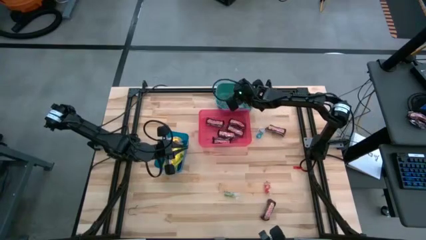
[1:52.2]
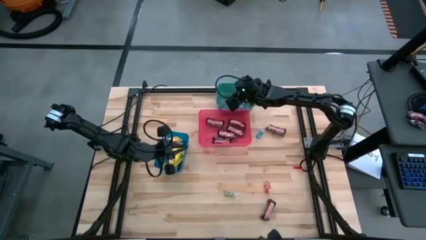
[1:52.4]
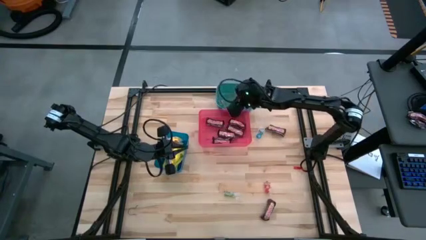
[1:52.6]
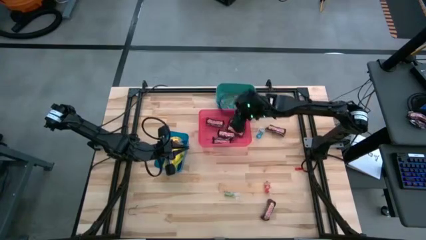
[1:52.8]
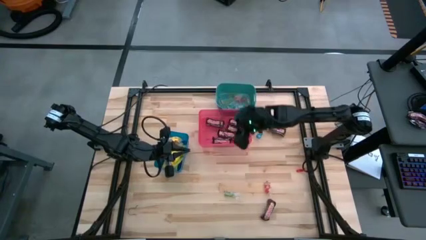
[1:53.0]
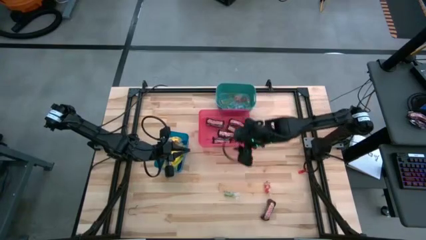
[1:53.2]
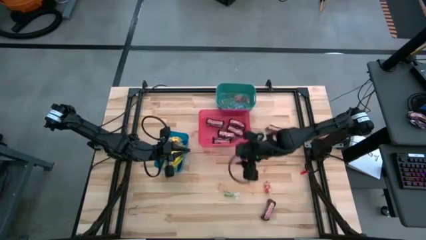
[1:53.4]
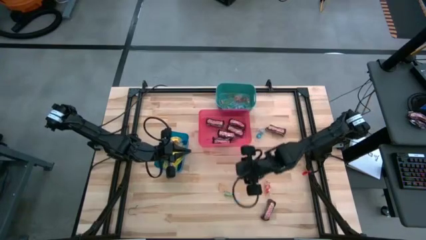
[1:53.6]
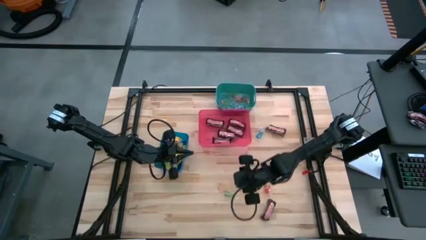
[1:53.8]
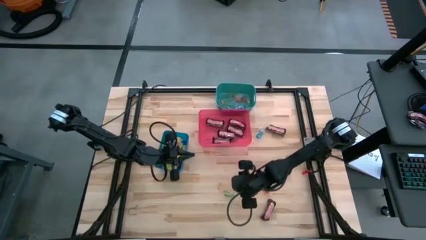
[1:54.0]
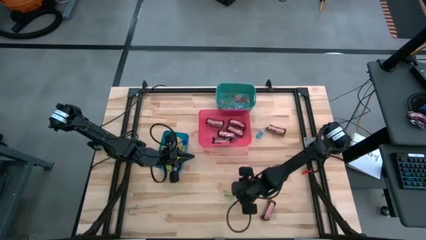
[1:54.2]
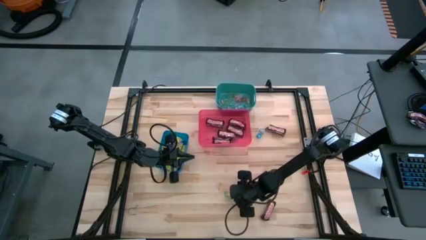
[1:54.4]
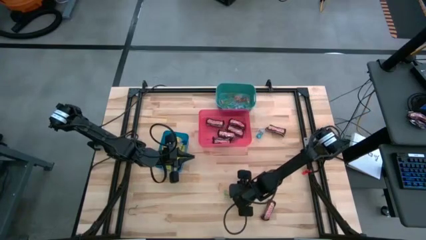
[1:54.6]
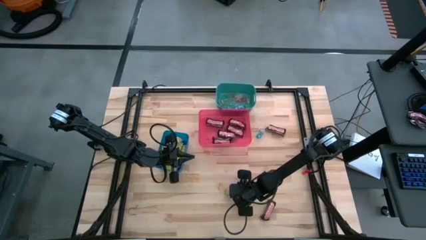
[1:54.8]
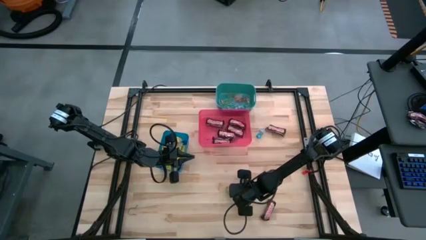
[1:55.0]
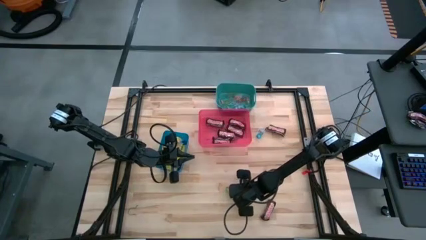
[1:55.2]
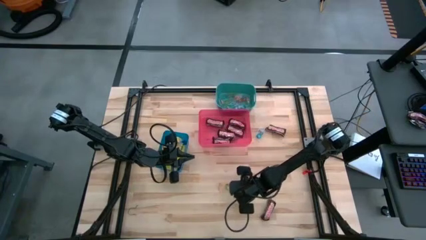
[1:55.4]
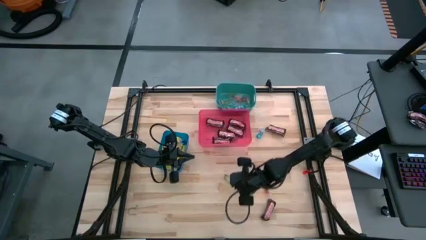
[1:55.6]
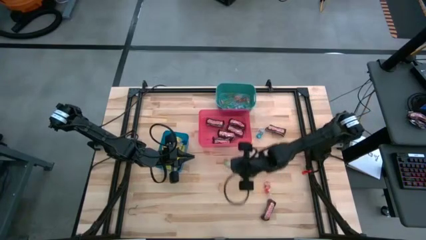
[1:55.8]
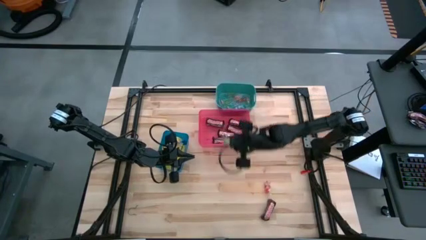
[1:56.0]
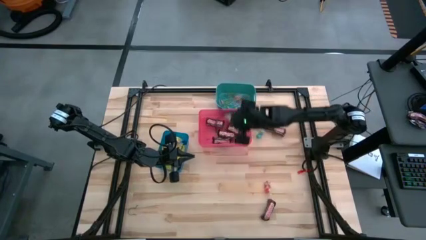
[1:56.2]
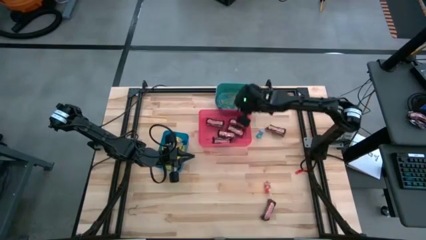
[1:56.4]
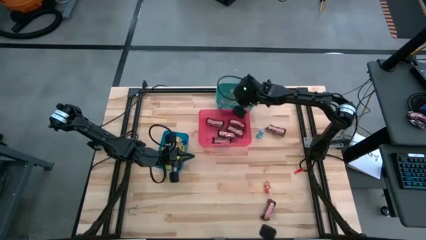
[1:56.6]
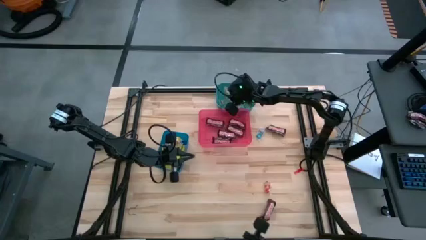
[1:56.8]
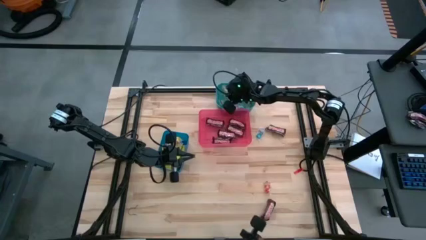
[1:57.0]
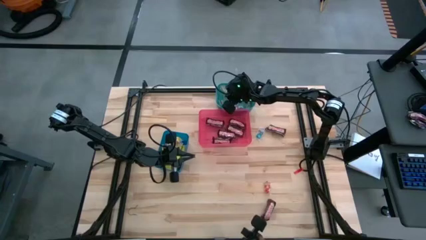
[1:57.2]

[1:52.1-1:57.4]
Task: Sort candy
Put the green gummy into the green bin

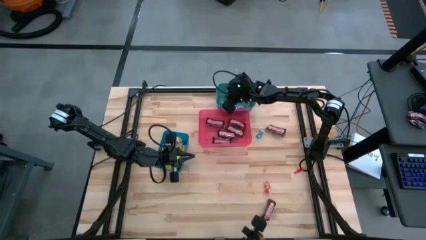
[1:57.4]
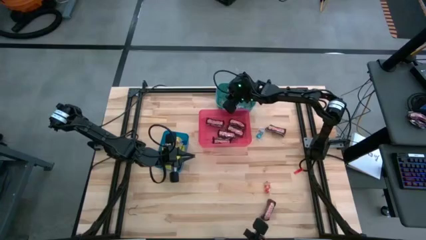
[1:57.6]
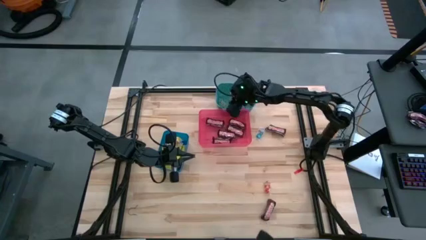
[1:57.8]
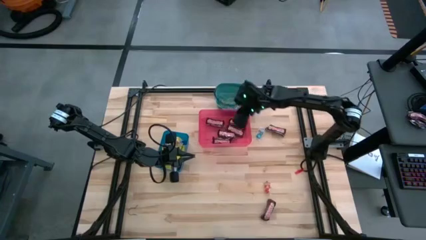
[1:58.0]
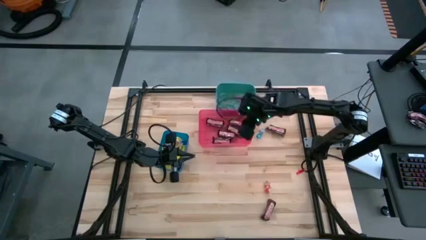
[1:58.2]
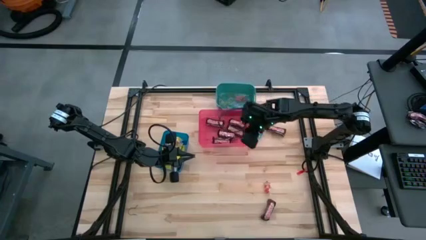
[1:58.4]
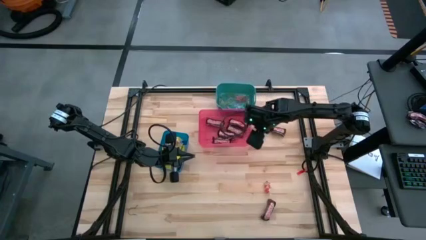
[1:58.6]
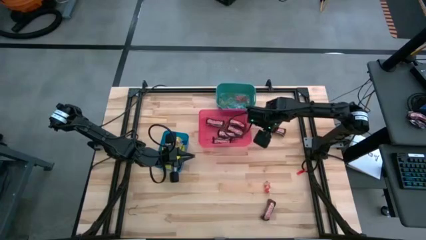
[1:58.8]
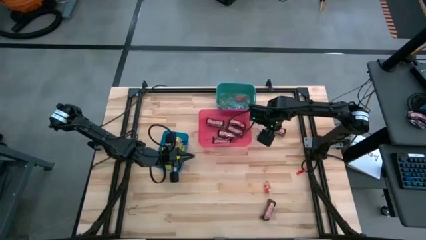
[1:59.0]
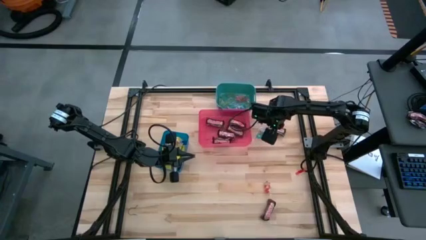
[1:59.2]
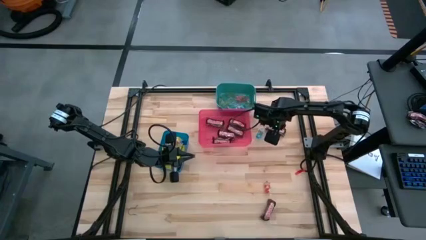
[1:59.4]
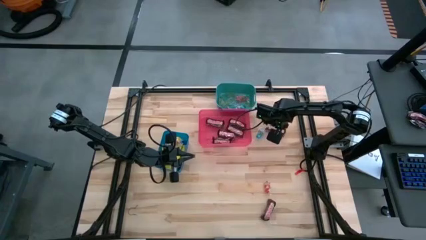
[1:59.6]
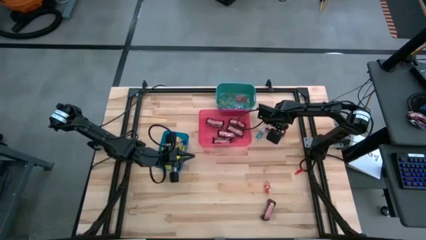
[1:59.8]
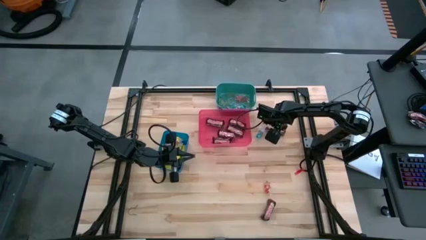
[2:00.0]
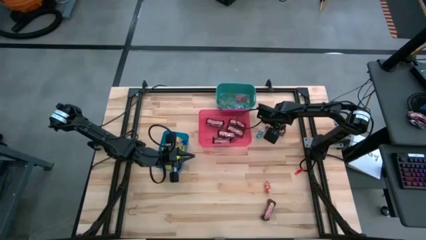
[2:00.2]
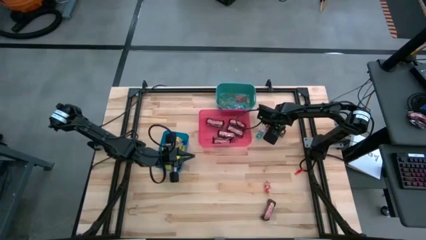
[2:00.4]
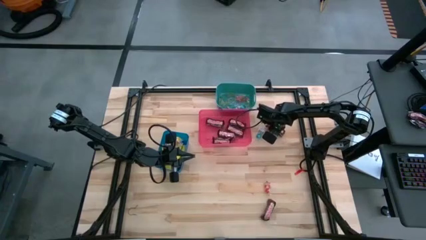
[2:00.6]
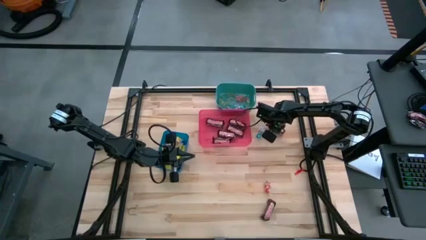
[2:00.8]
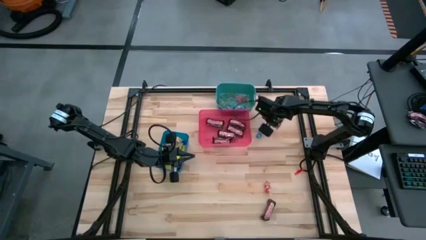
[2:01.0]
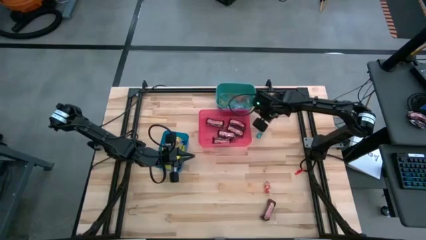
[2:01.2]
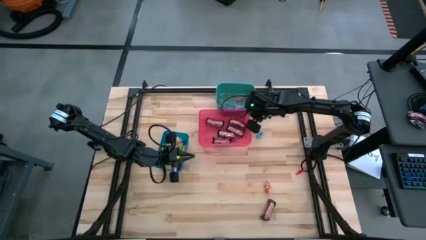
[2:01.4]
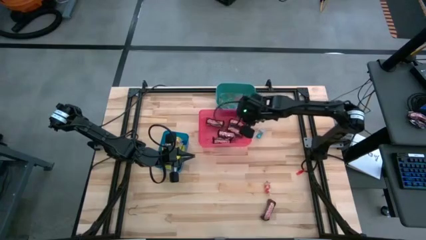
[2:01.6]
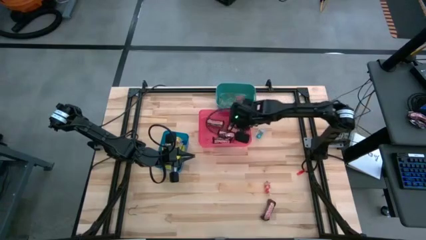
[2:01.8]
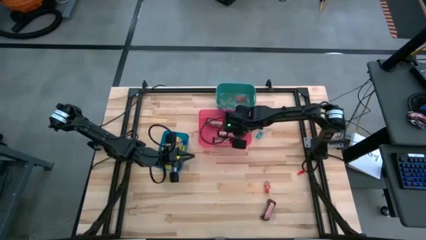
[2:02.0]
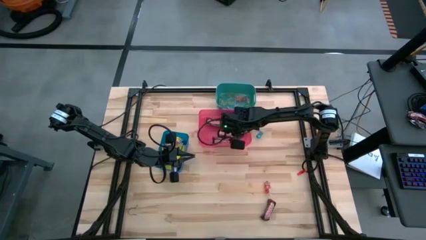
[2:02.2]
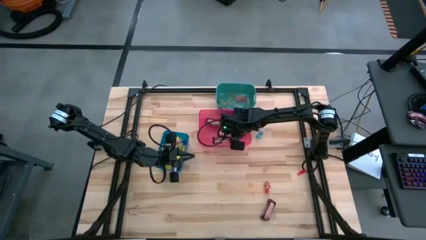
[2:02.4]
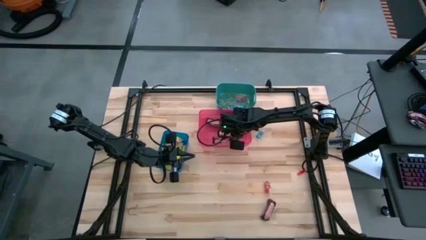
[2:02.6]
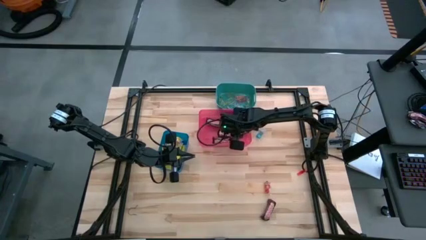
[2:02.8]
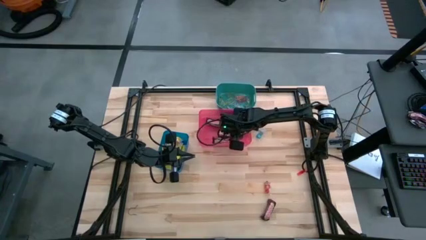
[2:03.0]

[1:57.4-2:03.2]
Put the brown chocolate bar into the red bin

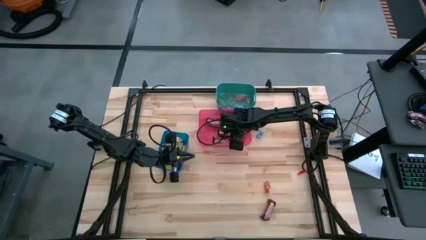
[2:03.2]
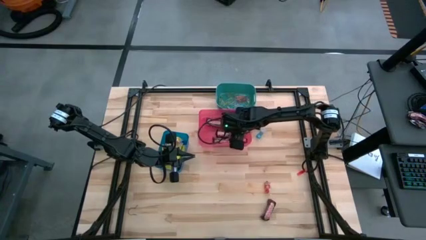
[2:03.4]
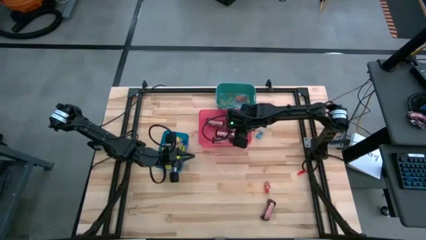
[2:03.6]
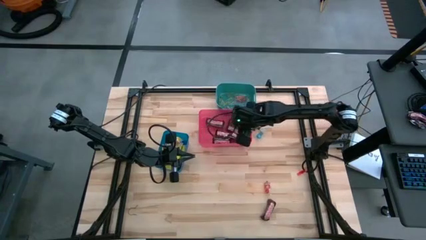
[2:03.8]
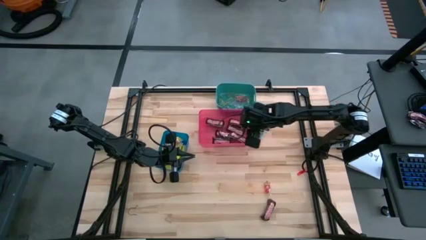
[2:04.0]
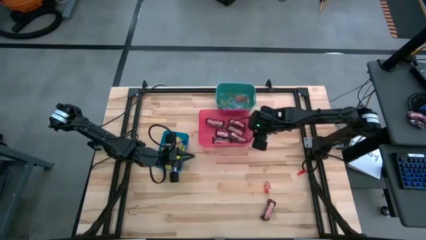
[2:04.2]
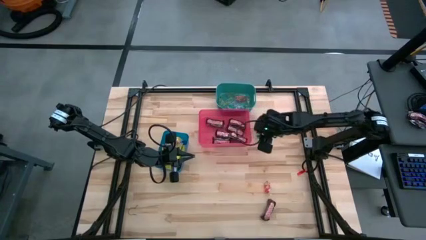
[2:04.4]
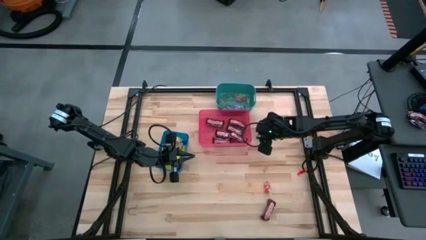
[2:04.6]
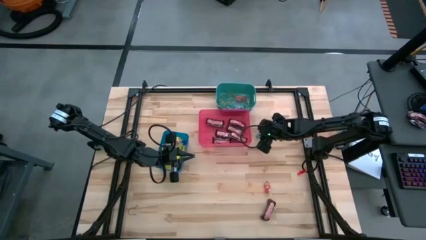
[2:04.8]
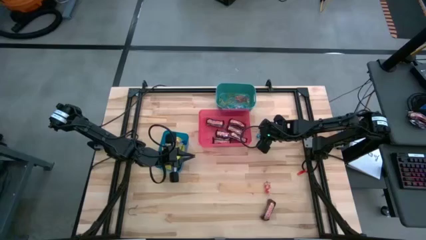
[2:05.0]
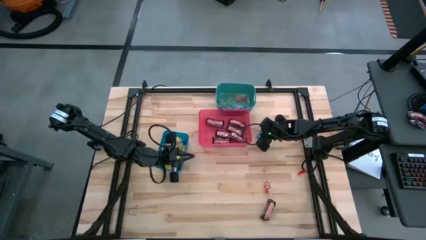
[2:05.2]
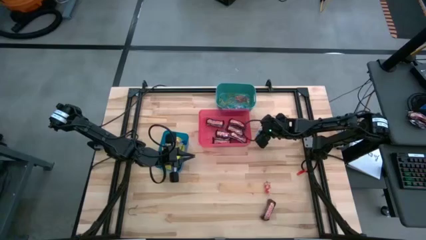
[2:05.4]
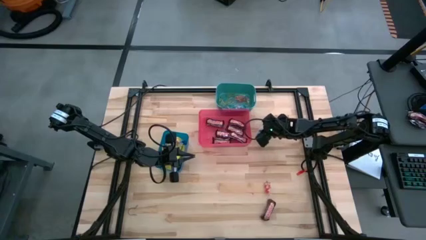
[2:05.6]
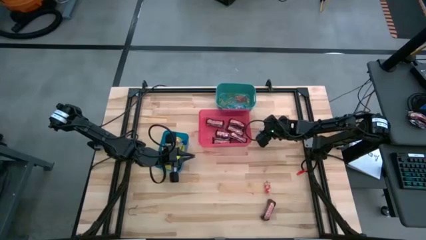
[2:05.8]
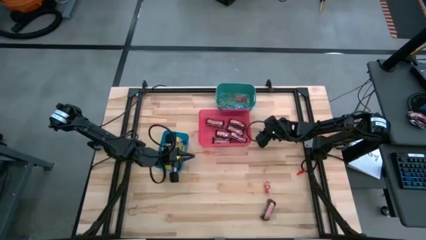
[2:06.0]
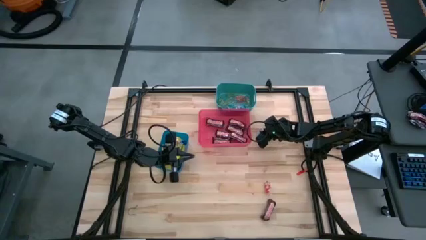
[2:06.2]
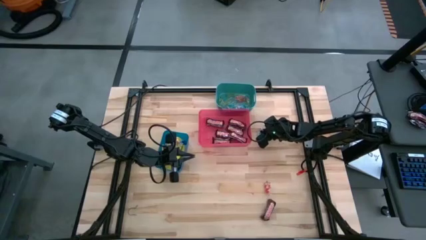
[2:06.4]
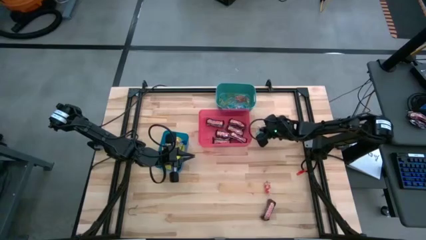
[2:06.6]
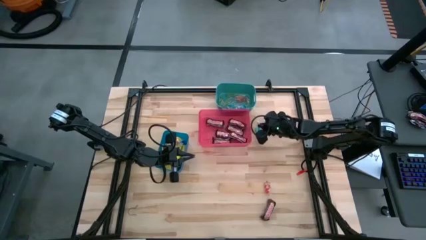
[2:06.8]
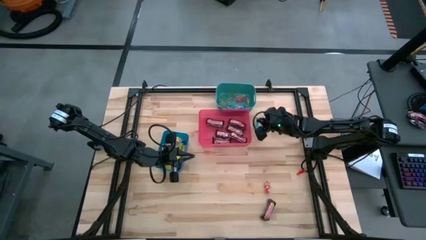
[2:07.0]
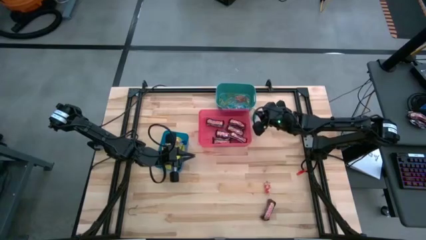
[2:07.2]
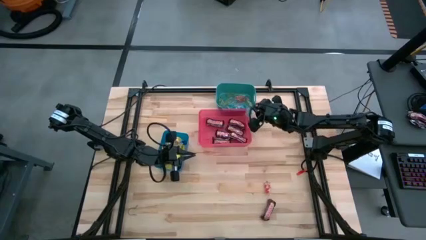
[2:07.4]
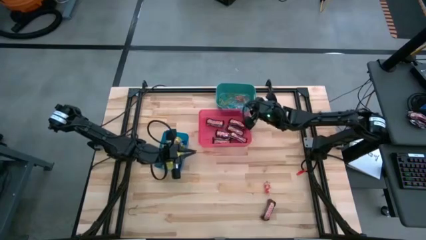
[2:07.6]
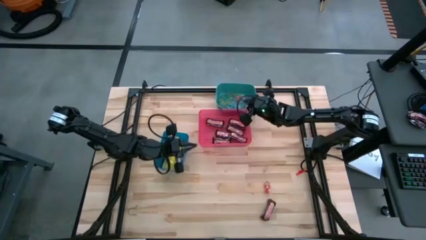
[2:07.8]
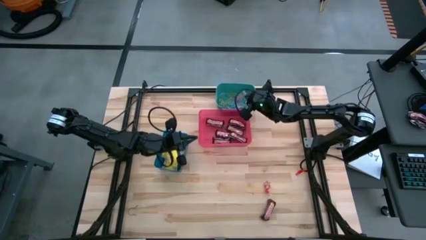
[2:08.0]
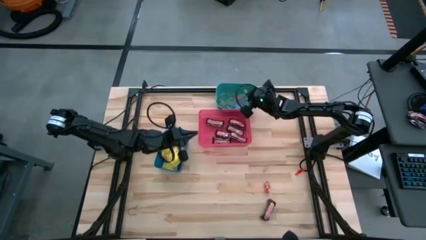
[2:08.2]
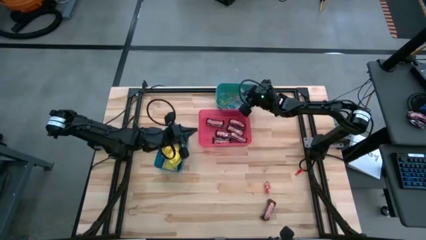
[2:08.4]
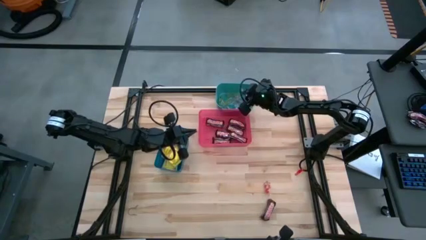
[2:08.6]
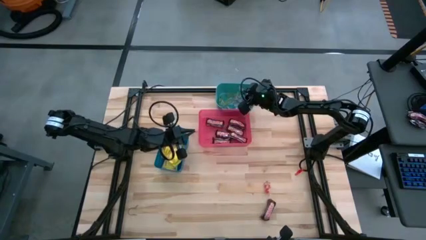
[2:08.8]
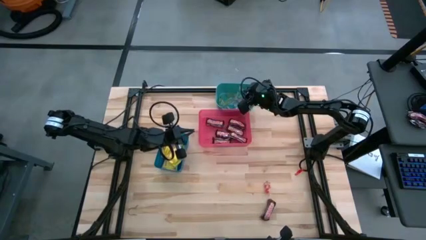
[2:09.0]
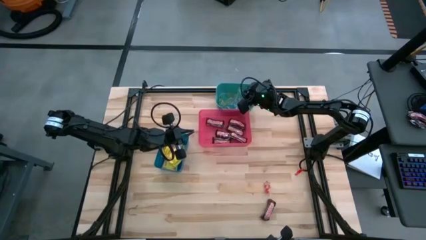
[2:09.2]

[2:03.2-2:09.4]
Put the blue gummy into the green bin
